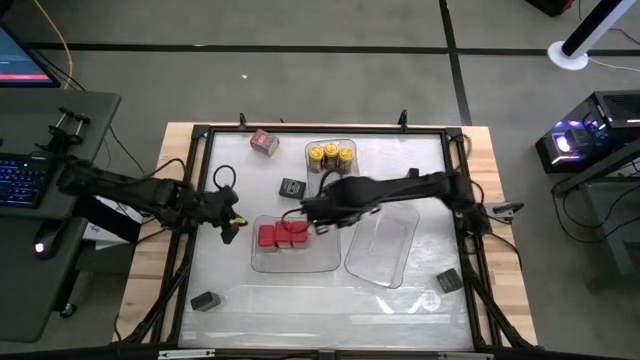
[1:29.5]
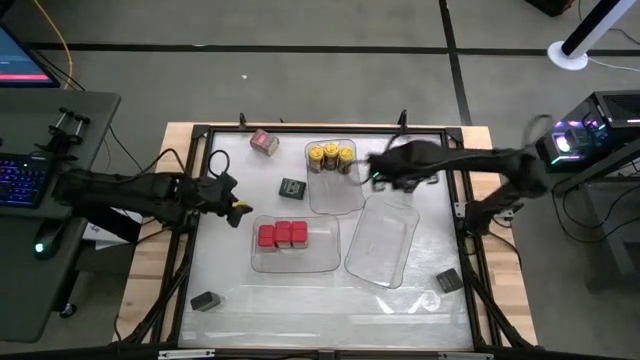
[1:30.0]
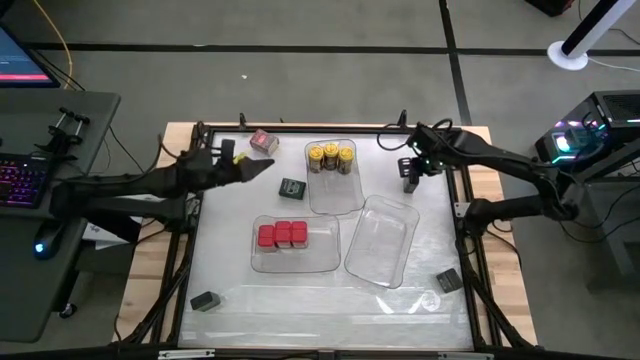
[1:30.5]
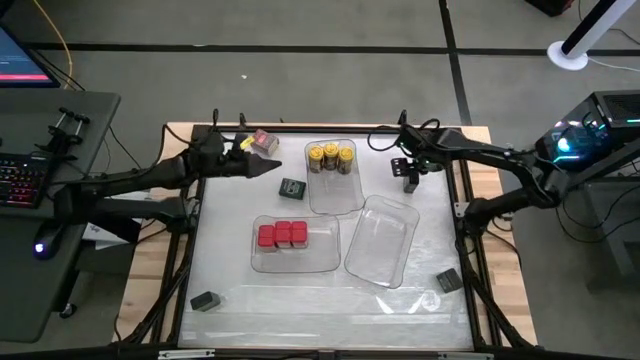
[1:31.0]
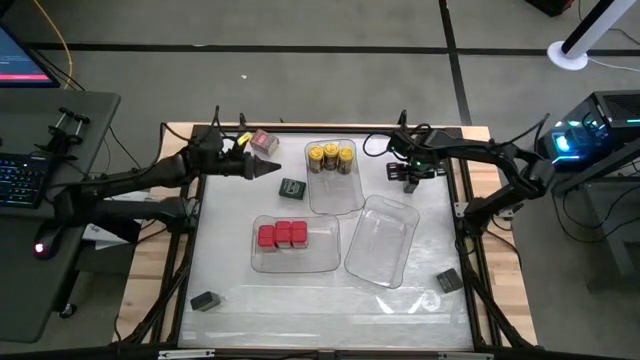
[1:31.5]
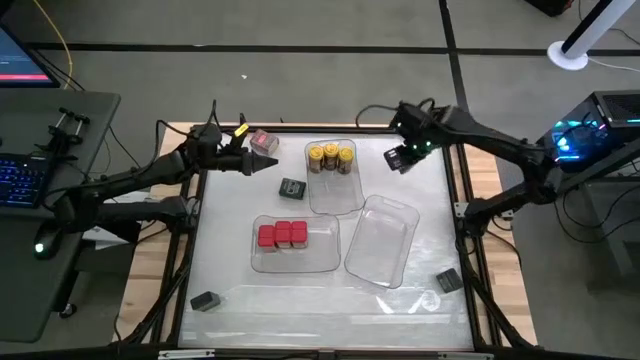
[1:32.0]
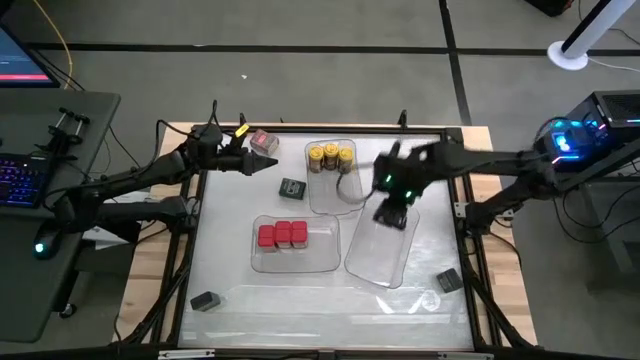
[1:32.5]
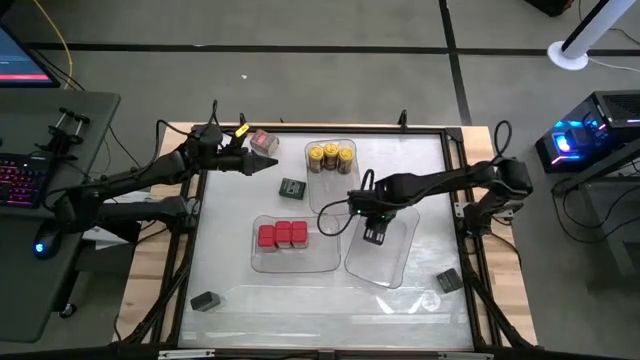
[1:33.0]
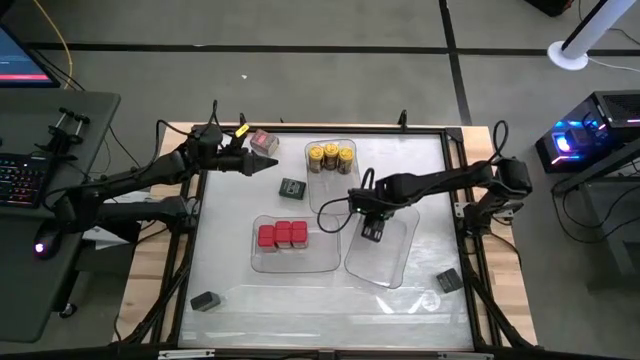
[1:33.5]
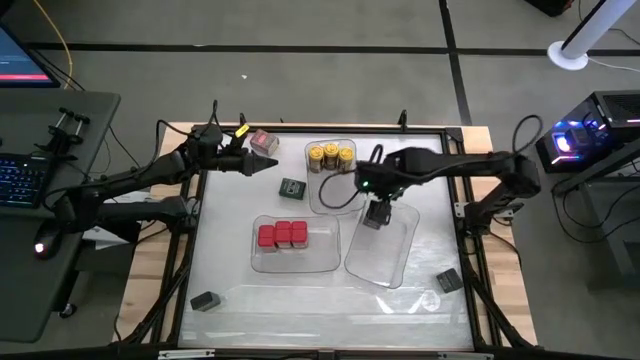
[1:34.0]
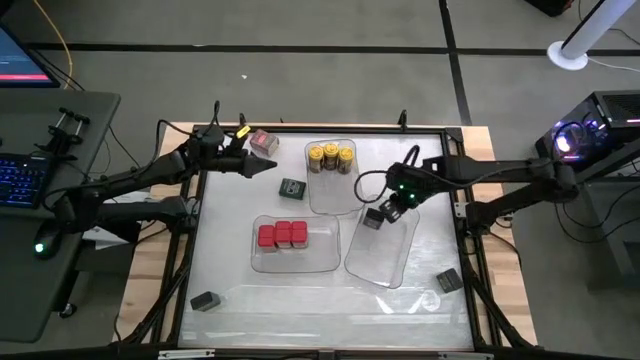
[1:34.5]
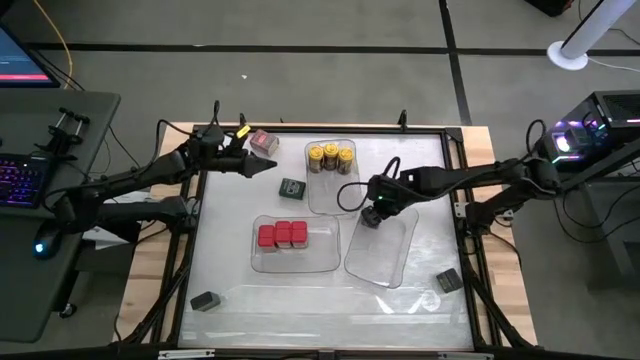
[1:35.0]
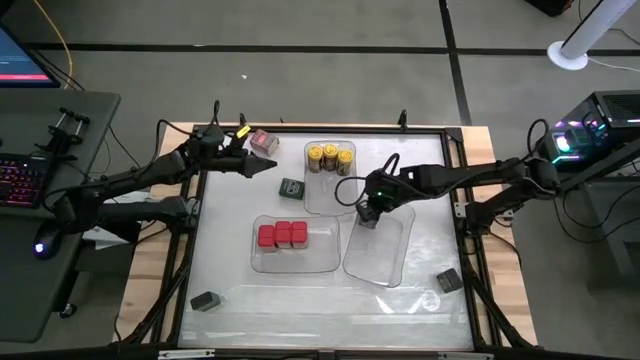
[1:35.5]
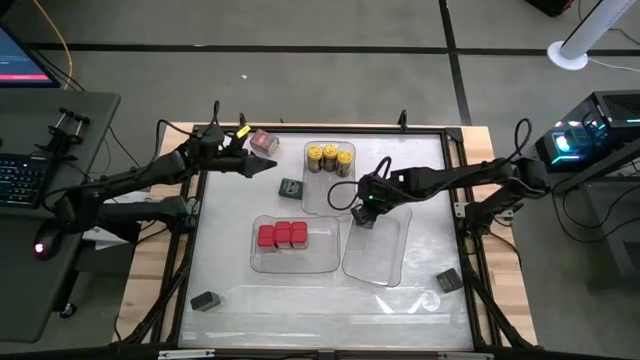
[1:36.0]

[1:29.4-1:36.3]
Task: Sort spices by type
Put the top right green seasoning can into the right transparent bin

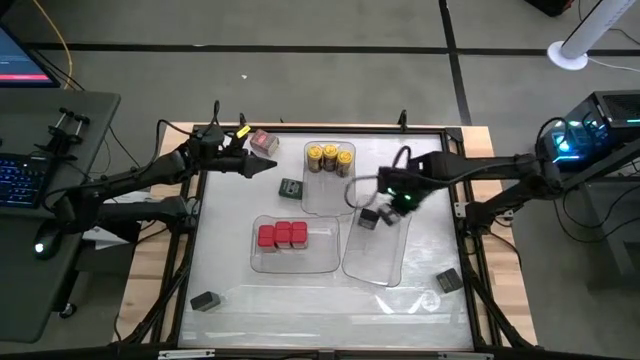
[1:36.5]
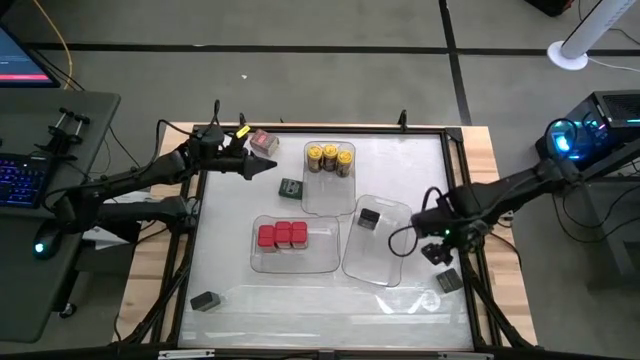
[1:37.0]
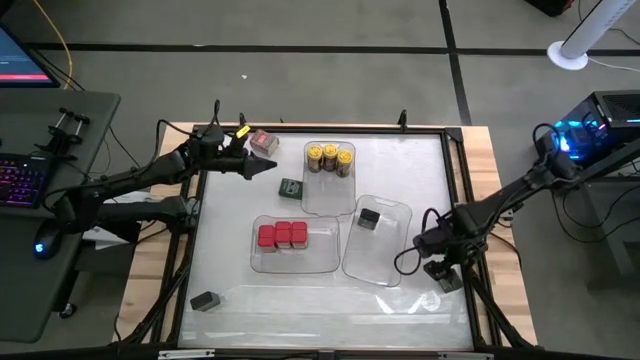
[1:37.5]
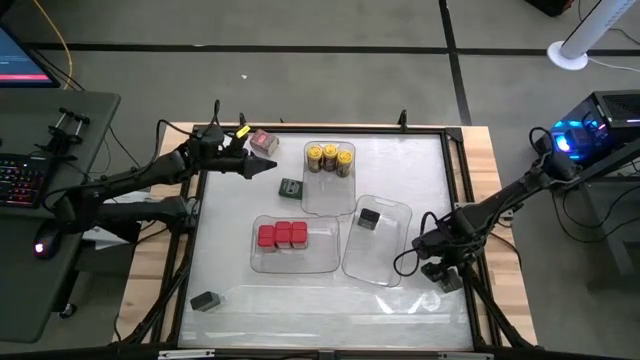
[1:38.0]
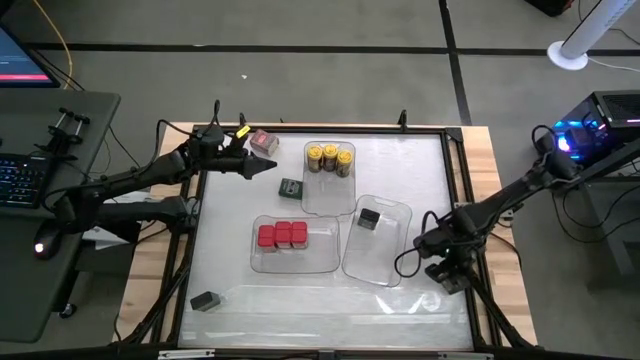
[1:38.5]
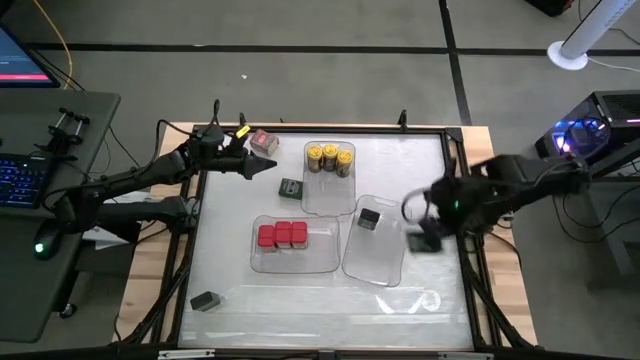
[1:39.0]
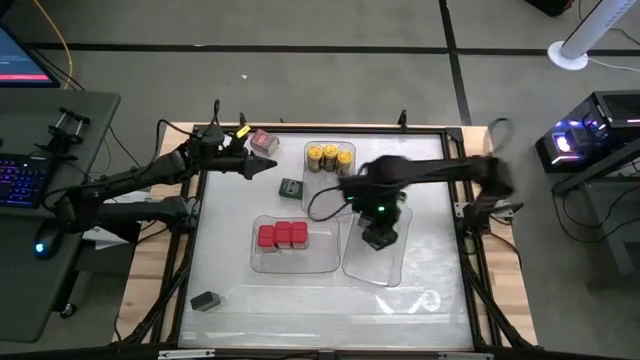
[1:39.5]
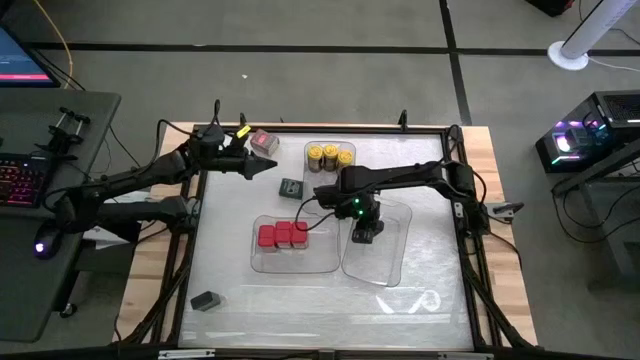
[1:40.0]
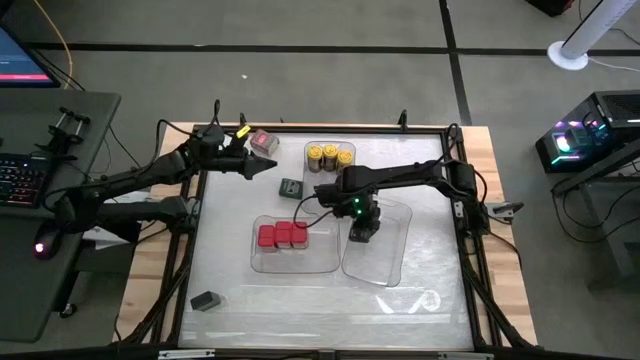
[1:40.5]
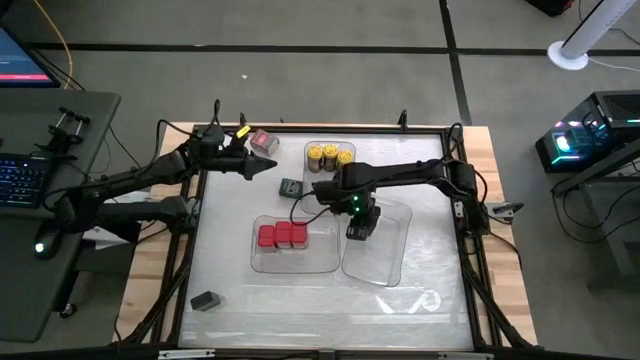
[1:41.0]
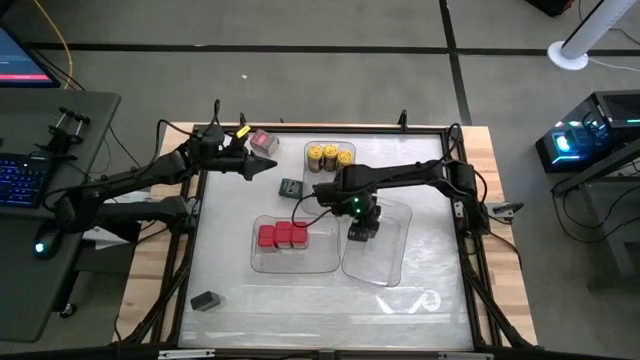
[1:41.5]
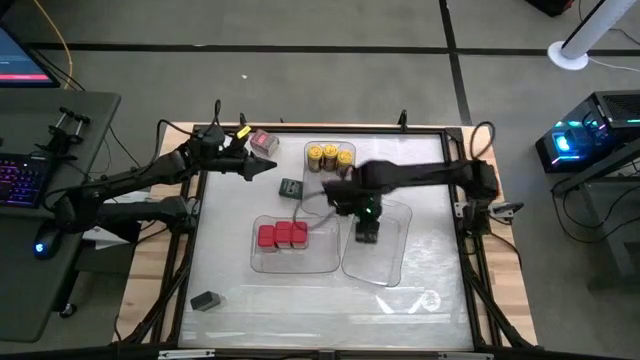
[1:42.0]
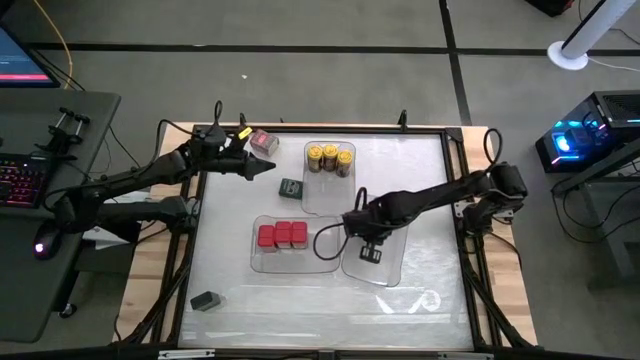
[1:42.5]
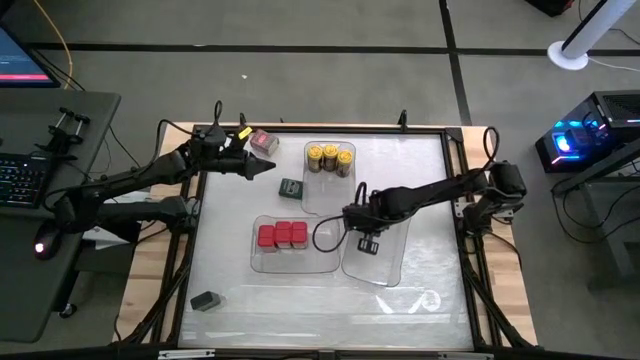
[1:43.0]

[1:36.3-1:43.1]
Put the bottom right green seasoning can into the right transparent bin

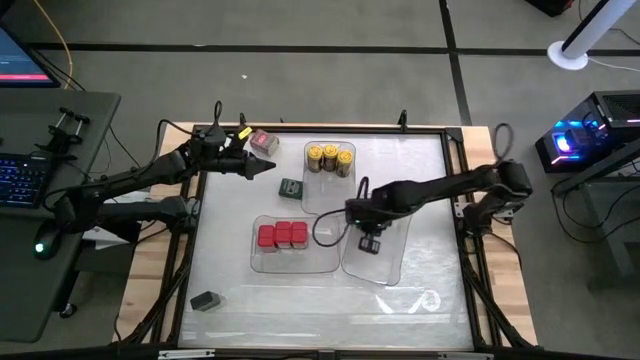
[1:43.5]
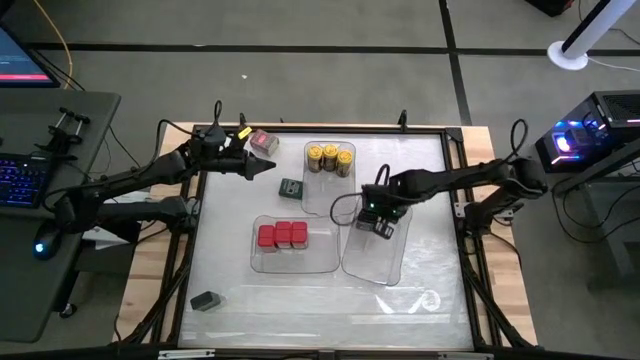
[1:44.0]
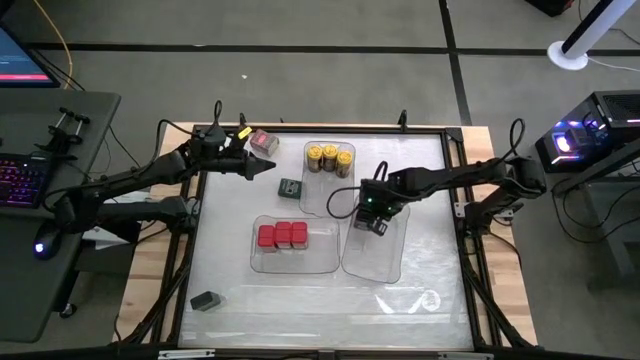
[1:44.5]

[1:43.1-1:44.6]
Adjust the green seasoning can in the right transparent bin

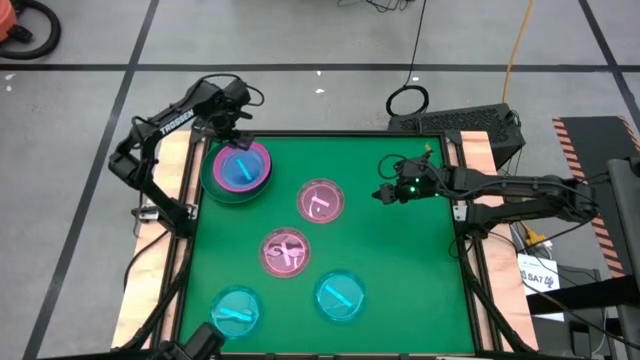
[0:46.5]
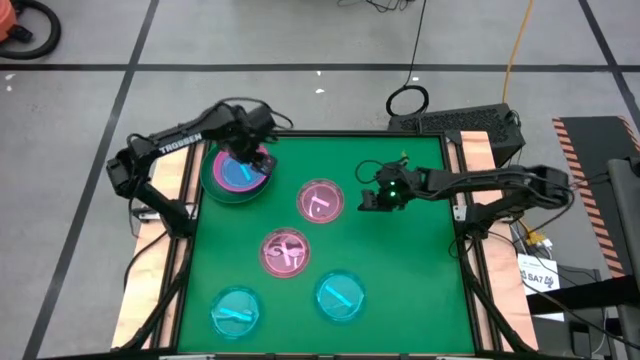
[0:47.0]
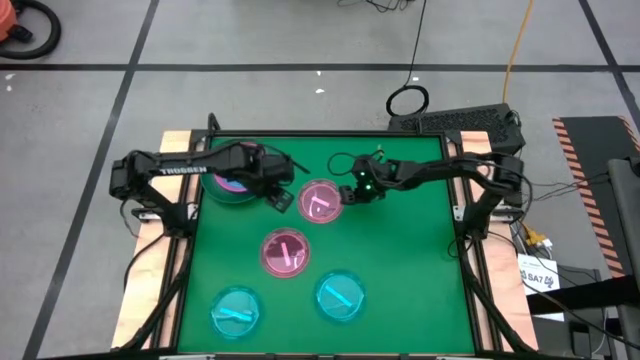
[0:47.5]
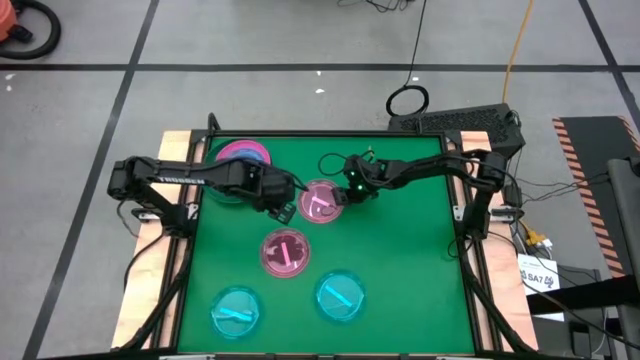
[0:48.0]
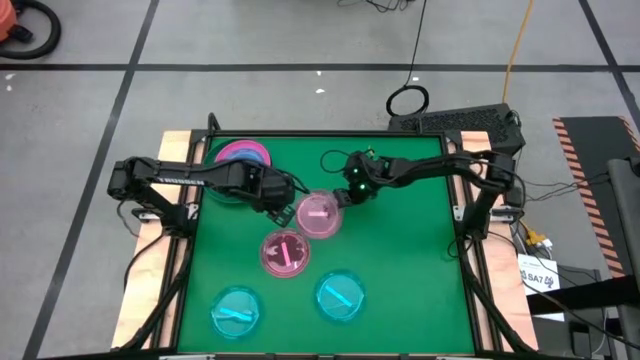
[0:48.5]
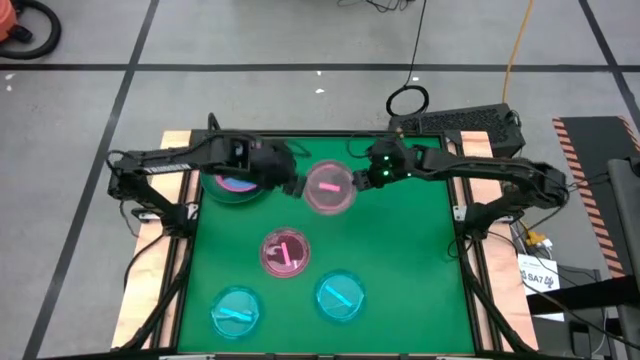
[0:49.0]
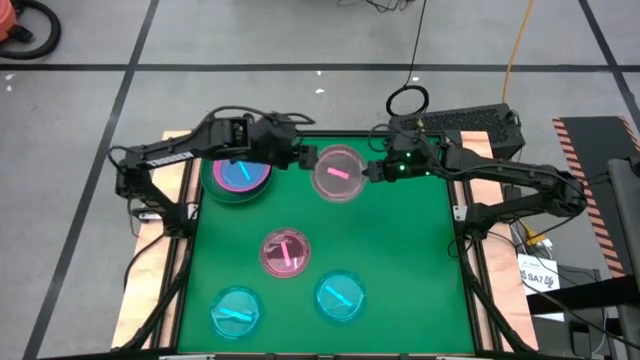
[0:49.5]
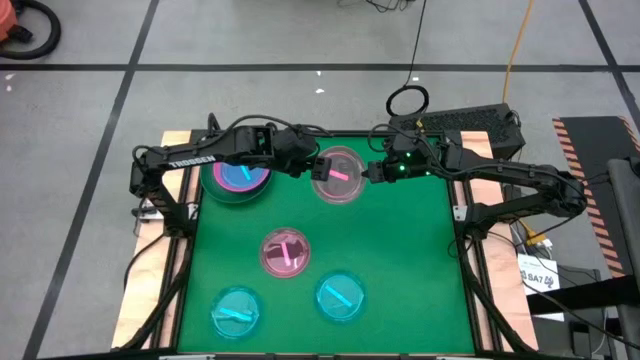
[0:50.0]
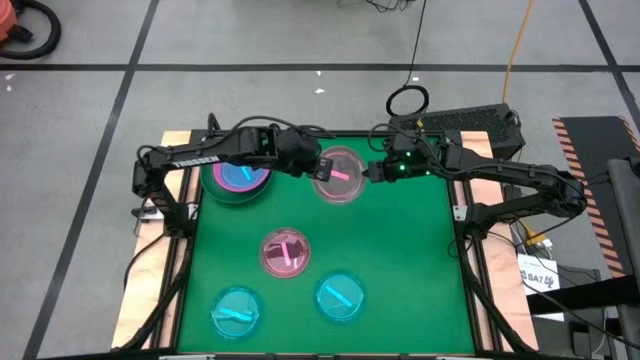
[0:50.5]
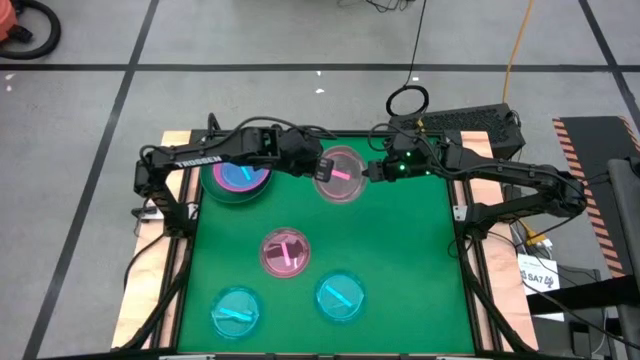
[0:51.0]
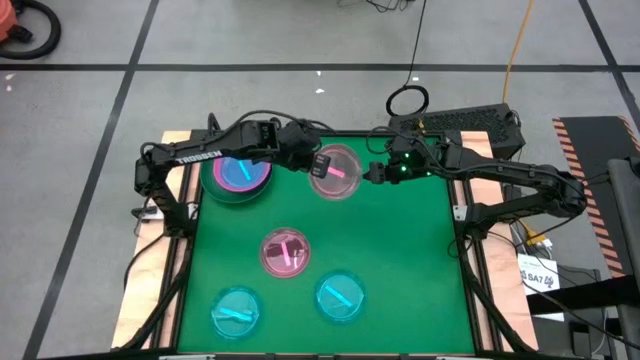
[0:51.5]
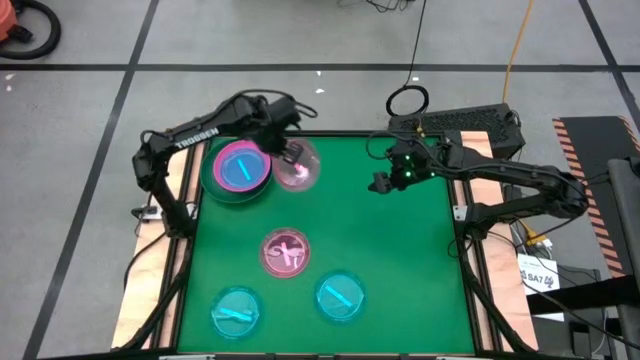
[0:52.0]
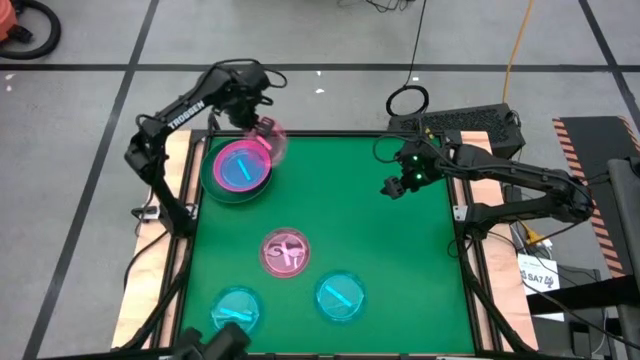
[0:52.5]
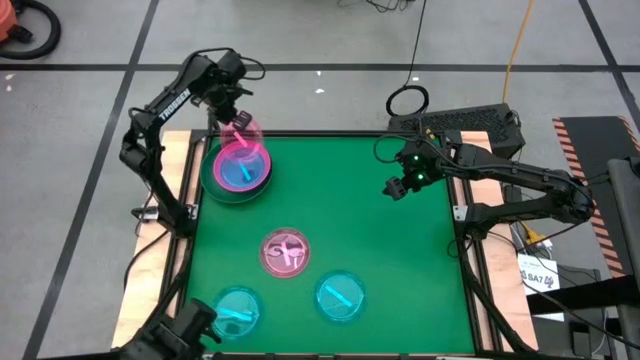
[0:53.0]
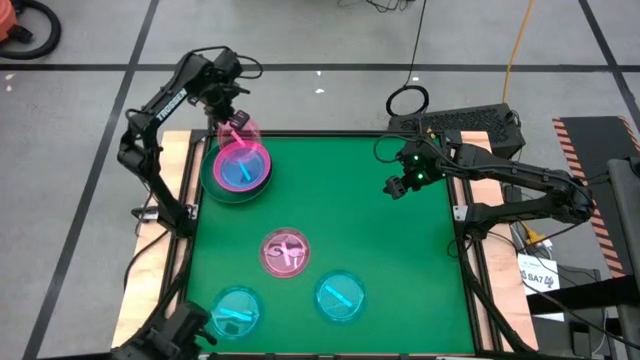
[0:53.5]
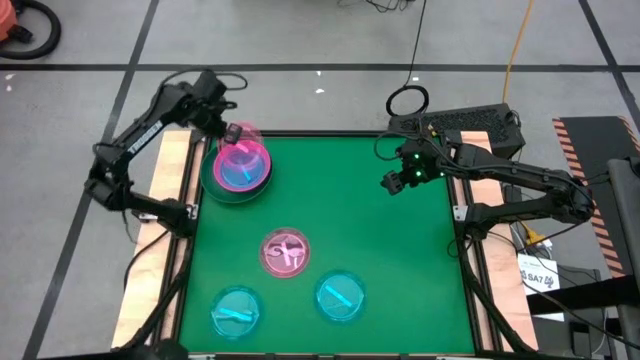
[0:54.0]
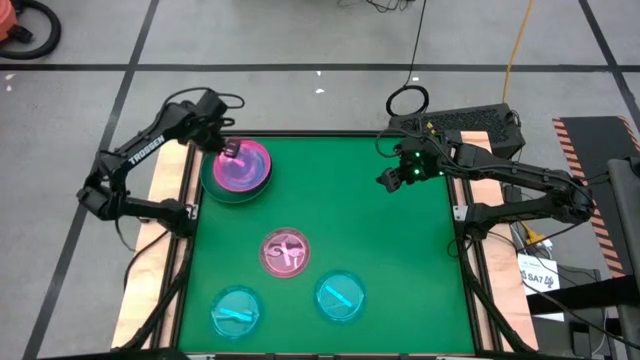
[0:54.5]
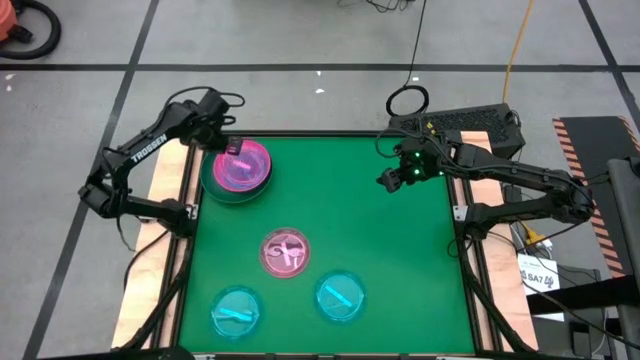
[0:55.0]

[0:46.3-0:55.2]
Task: Stack plastic plates
Stack the top light pink plate on top of the blue plate
